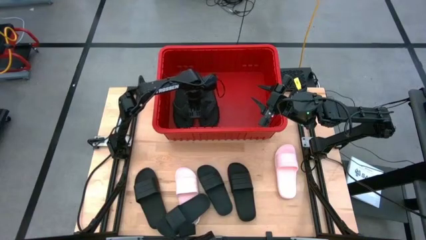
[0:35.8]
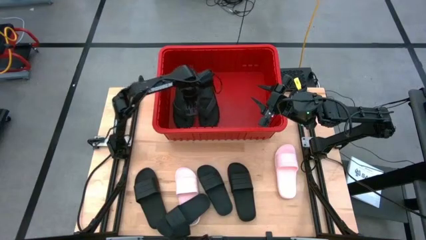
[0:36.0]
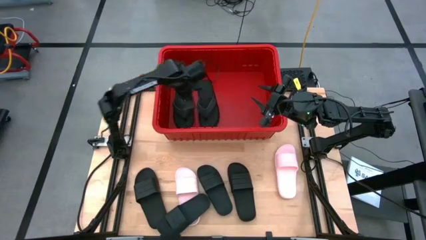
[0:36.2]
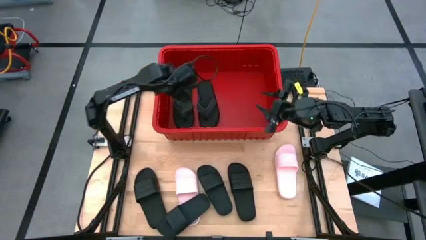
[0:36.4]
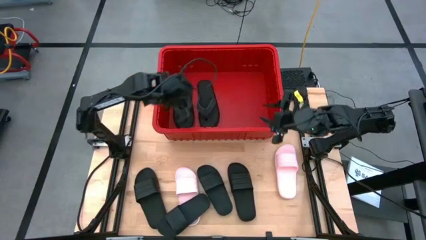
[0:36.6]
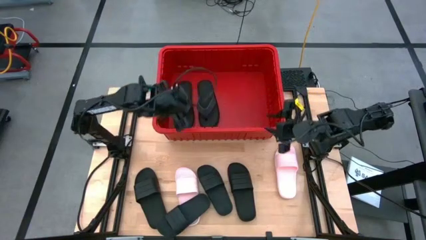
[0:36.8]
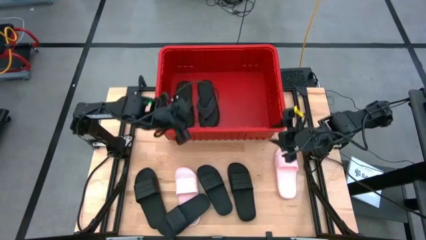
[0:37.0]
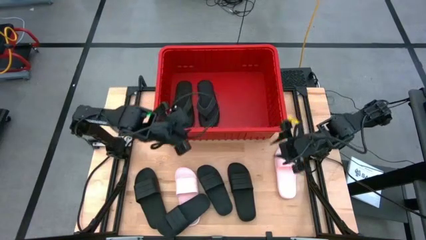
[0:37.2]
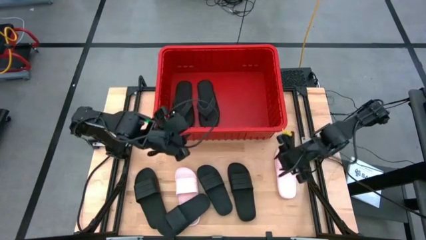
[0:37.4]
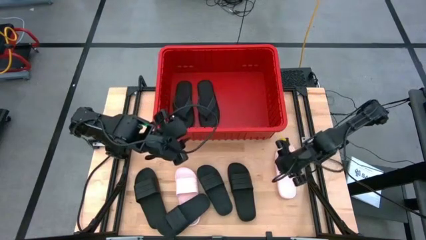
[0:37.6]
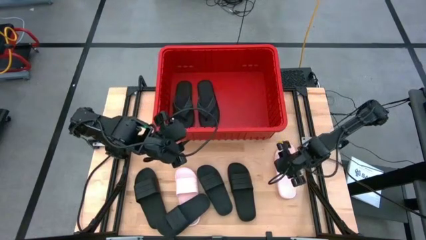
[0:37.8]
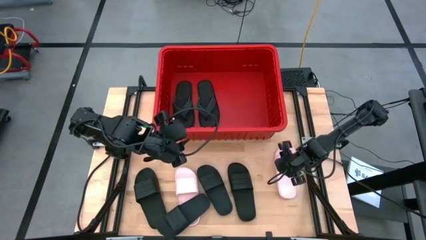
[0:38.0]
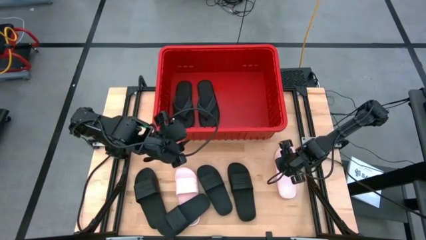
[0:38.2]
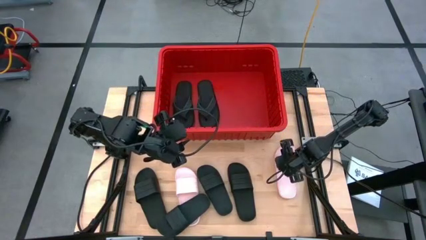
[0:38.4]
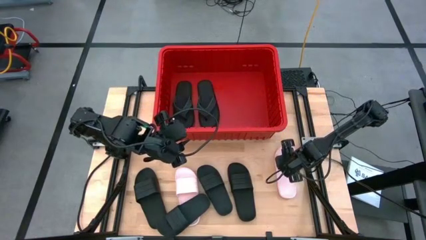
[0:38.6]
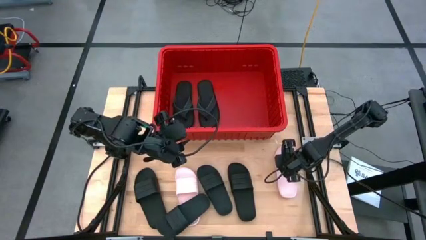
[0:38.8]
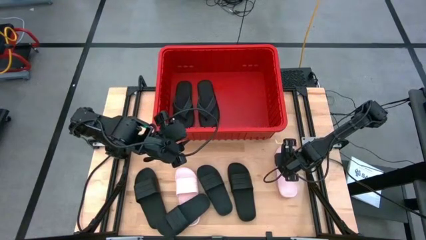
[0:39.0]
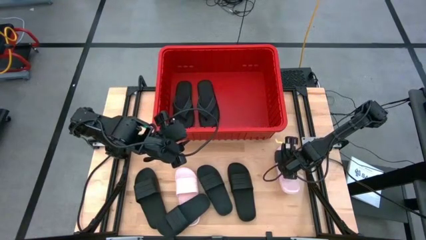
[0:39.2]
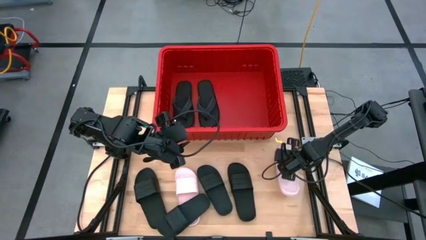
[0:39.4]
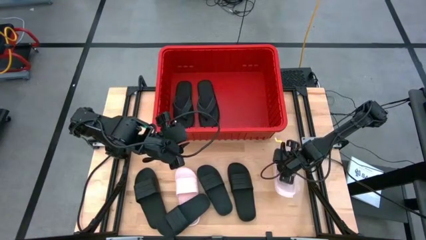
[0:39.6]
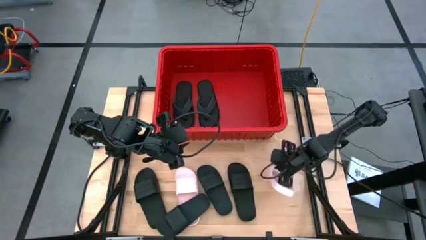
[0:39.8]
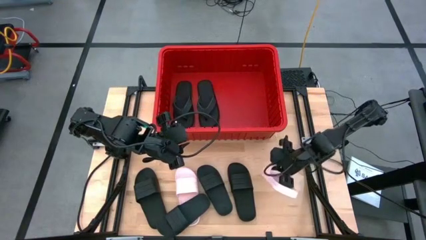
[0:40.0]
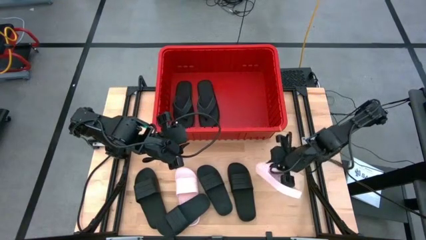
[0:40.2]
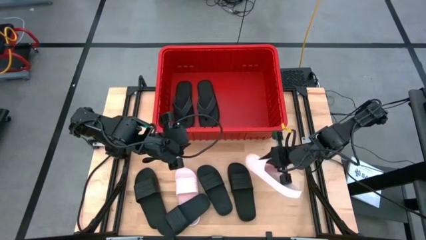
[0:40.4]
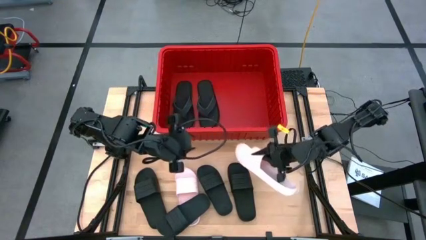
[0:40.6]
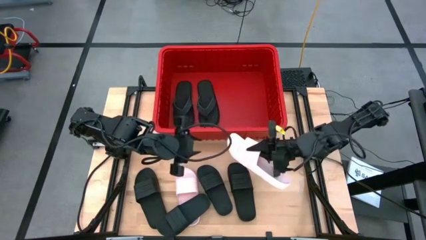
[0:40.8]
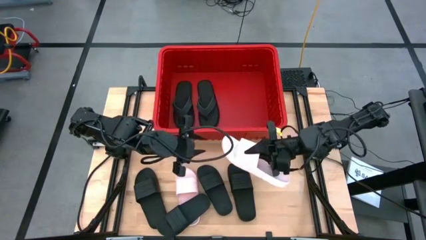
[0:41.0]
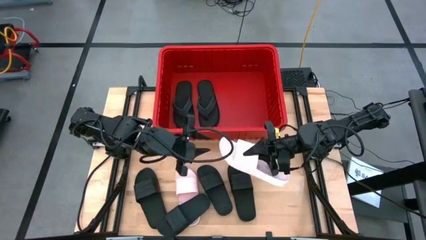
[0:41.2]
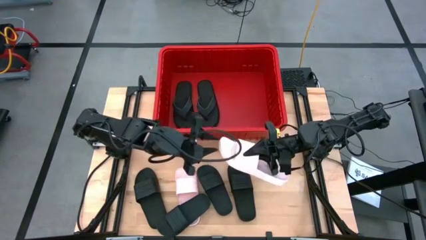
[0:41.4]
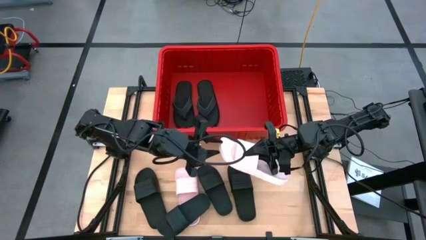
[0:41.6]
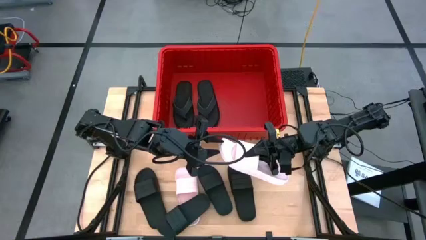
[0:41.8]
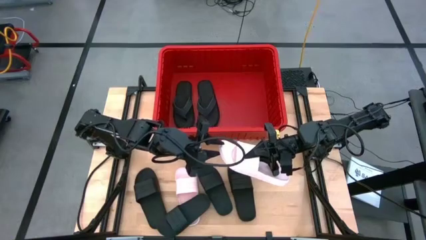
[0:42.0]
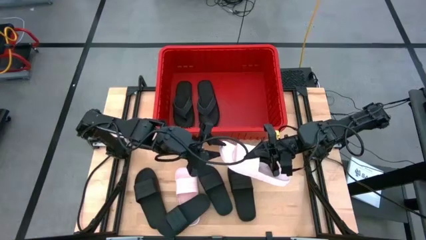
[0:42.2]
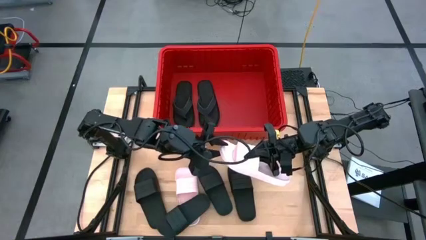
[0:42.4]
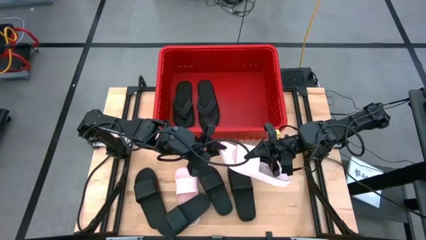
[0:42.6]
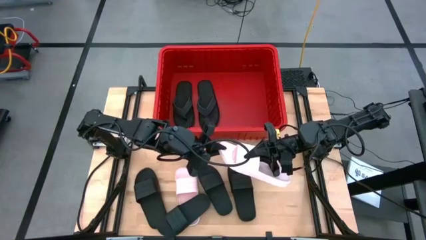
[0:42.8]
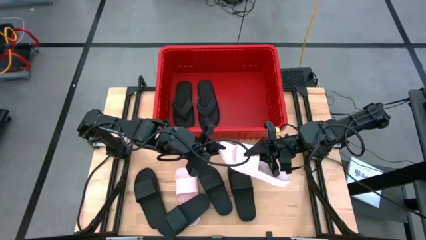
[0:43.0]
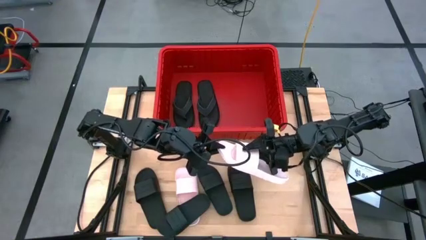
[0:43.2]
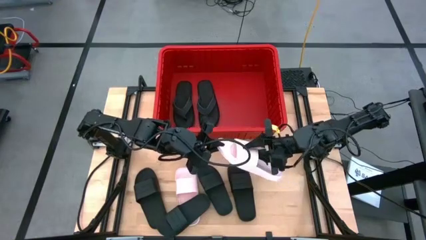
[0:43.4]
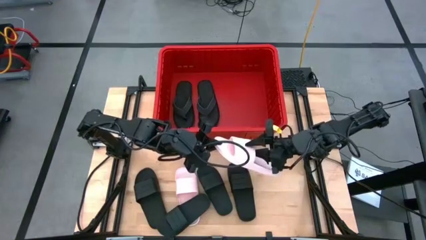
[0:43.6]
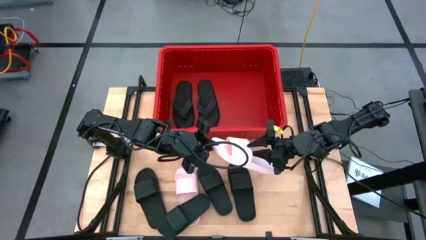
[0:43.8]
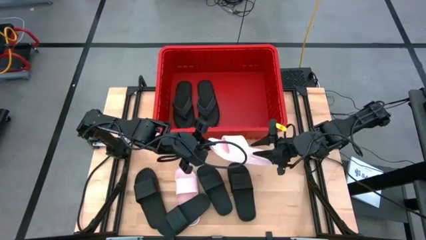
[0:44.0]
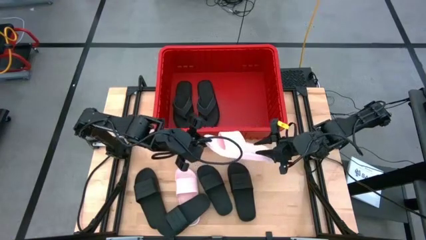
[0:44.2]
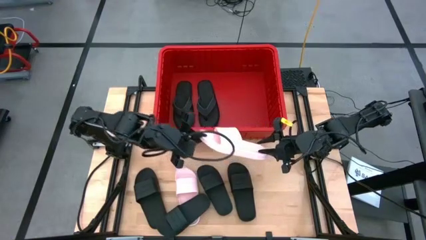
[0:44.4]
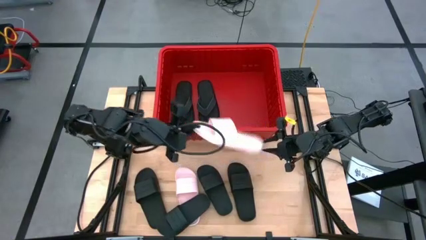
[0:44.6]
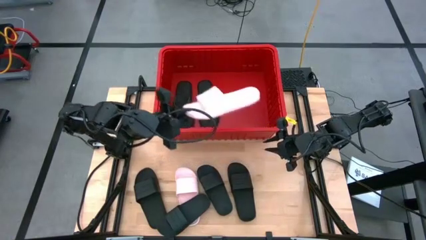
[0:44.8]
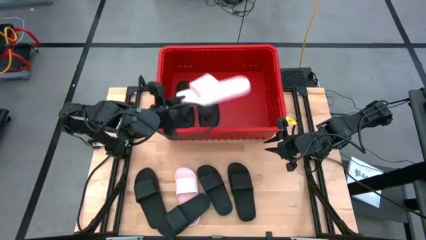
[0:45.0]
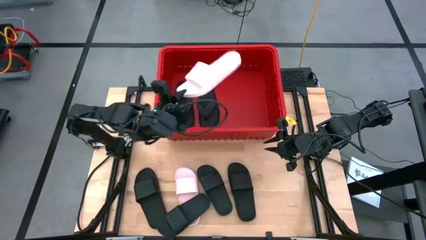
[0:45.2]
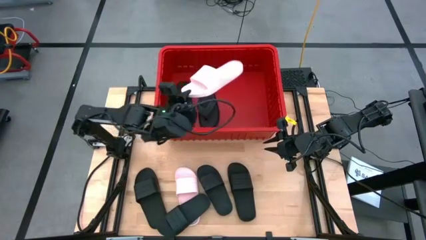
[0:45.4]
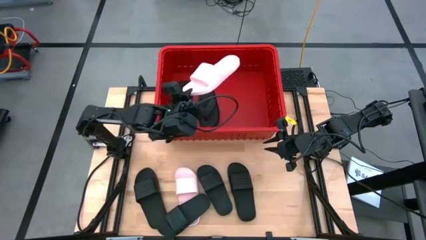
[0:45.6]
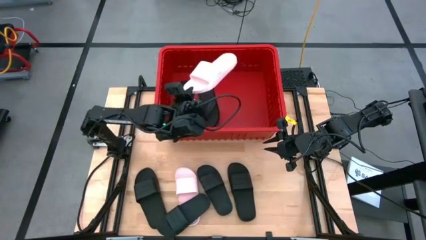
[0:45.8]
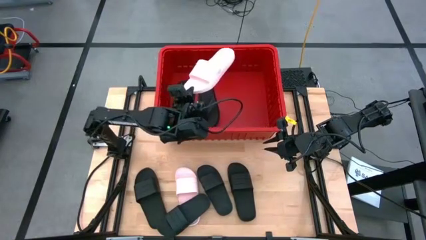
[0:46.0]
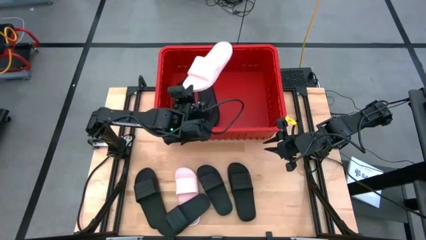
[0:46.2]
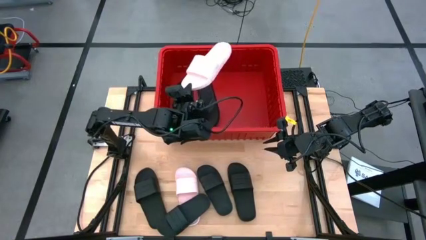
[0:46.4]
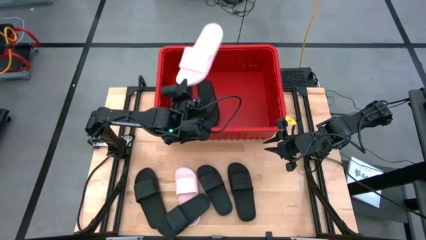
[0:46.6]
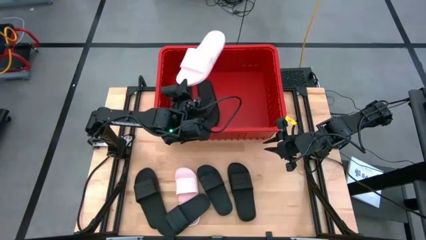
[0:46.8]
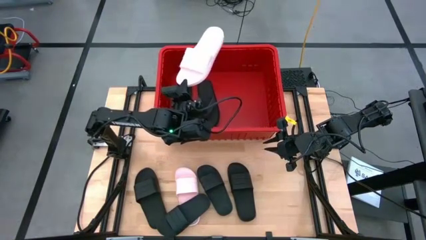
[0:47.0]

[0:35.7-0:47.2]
Task: Pick and place slides into bin
Put the pink slide into the red bin

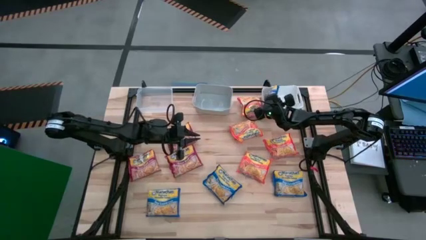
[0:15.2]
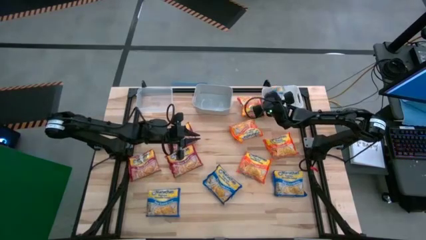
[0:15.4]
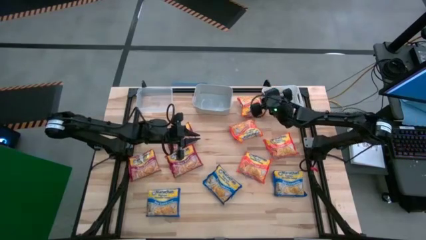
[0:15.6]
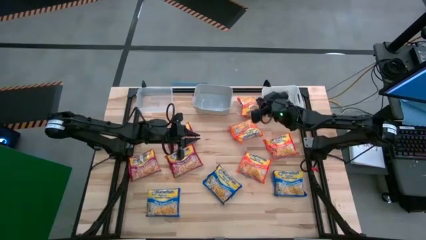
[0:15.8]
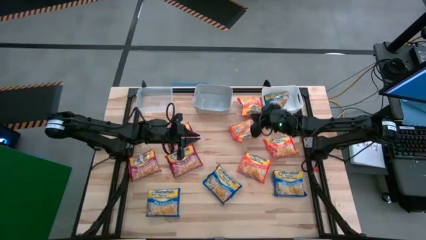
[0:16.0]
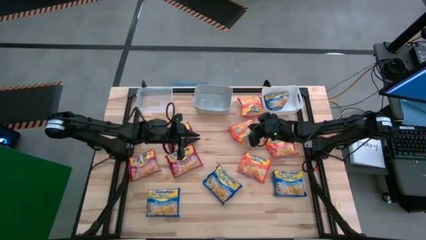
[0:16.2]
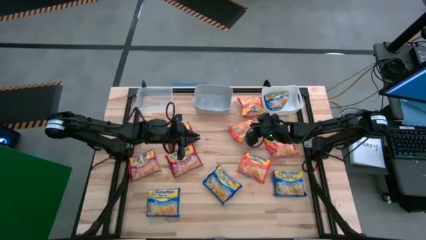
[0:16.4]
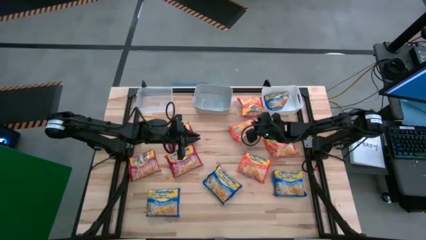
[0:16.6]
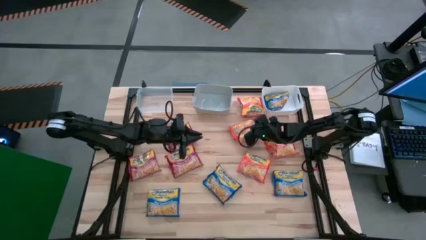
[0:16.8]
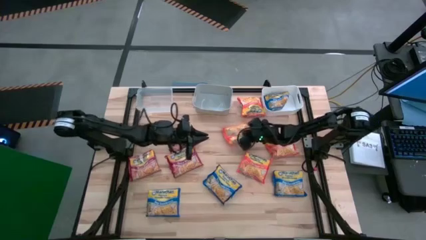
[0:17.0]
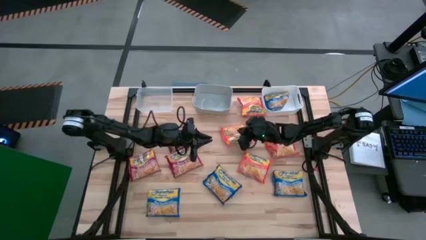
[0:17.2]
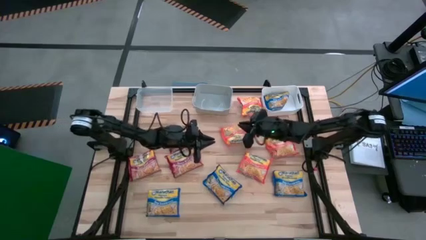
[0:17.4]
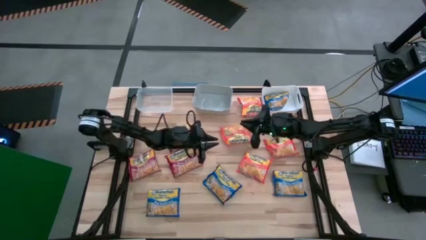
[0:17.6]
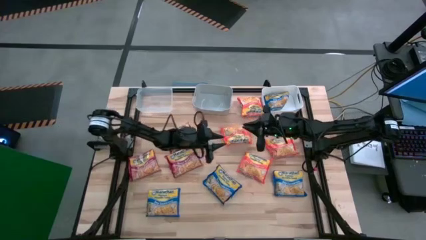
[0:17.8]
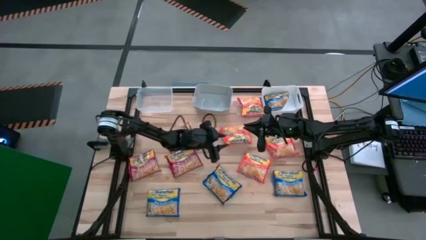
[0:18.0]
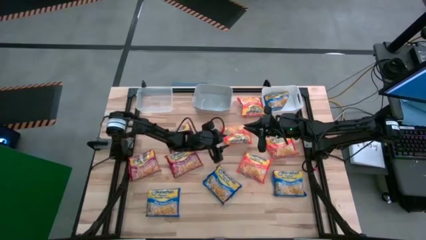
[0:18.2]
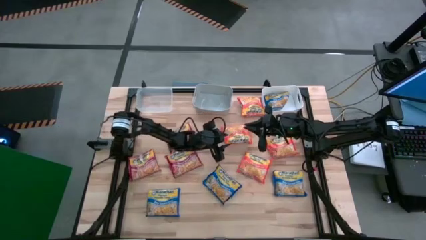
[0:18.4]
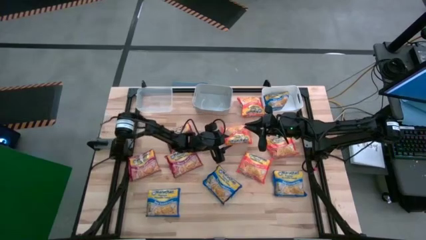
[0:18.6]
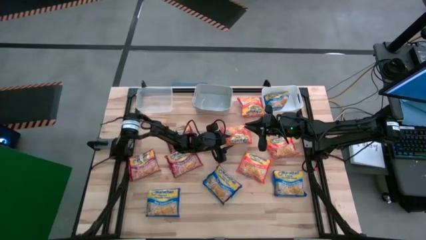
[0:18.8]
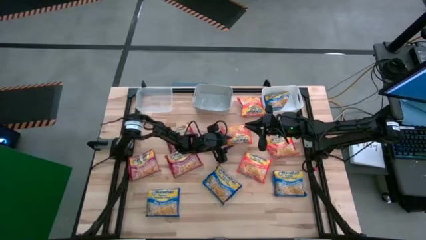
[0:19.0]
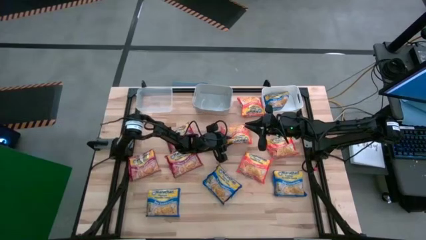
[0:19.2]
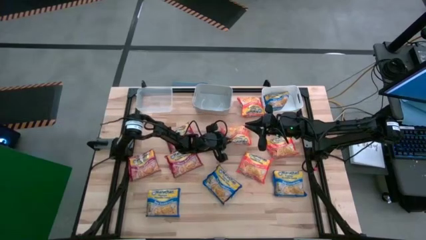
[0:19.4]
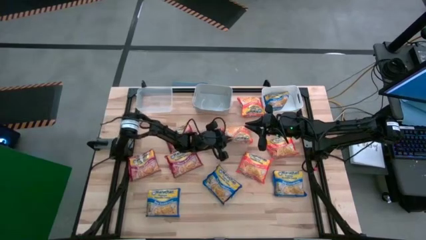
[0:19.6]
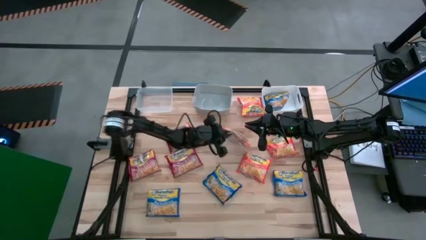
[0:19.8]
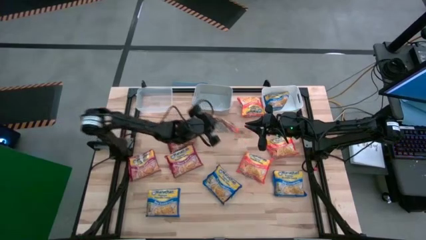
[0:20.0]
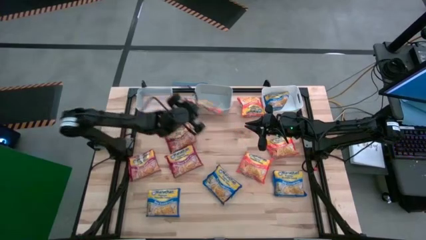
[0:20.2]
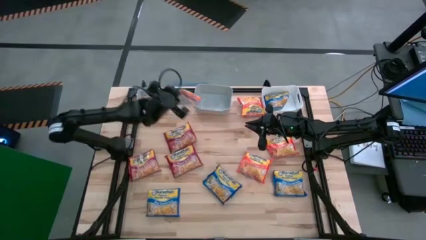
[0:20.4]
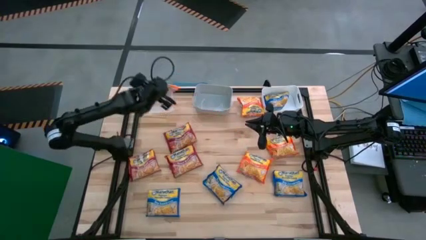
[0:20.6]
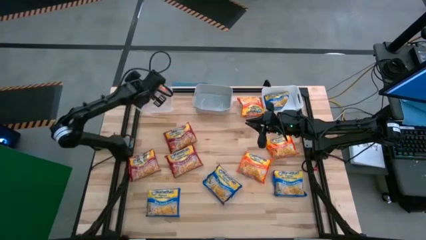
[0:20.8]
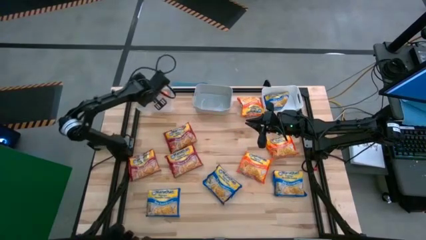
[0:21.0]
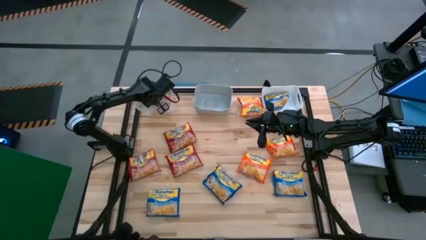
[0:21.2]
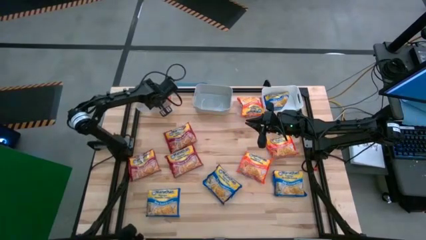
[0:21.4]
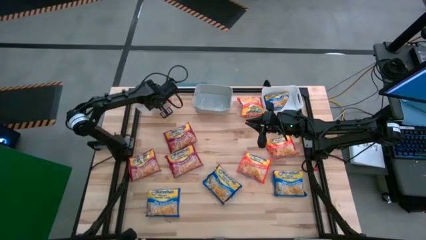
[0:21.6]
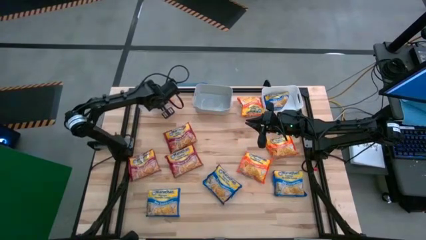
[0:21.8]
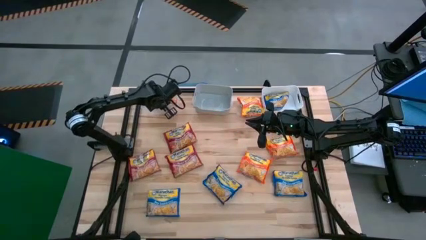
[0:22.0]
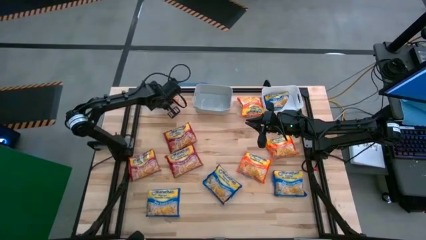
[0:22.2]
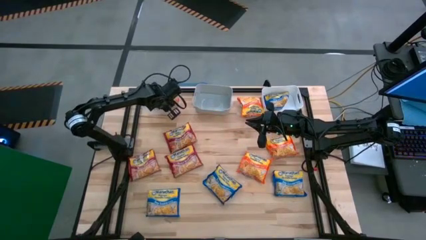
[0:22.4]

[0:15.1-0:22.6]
Task: Sort Maruchan noodles
Put the orange noodle pack into the transparent bin
